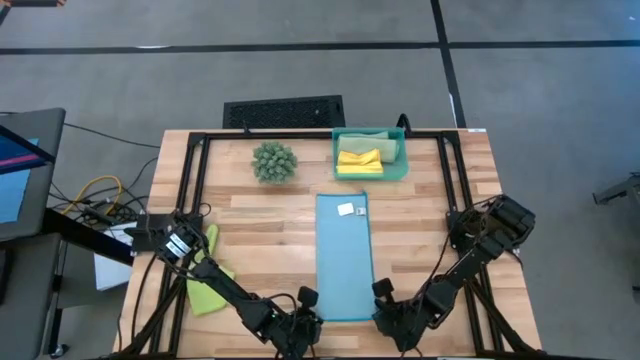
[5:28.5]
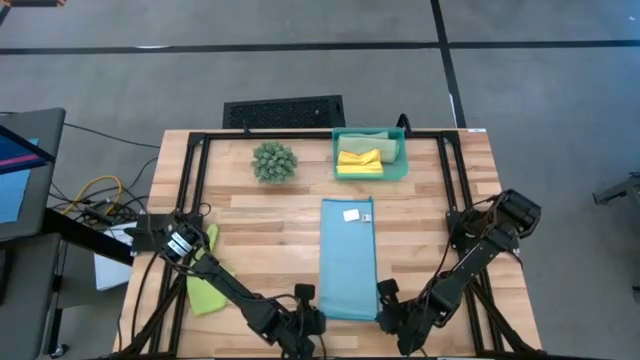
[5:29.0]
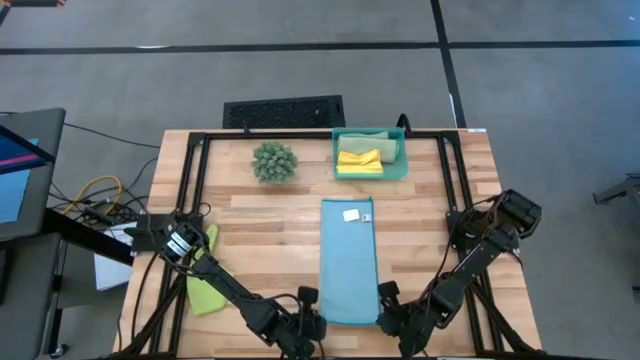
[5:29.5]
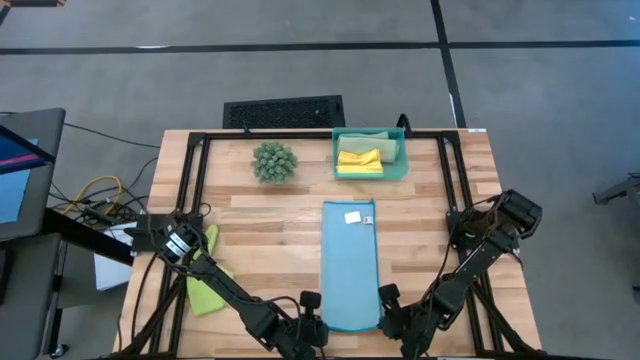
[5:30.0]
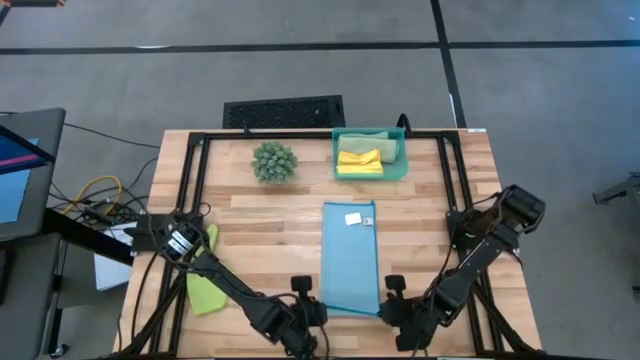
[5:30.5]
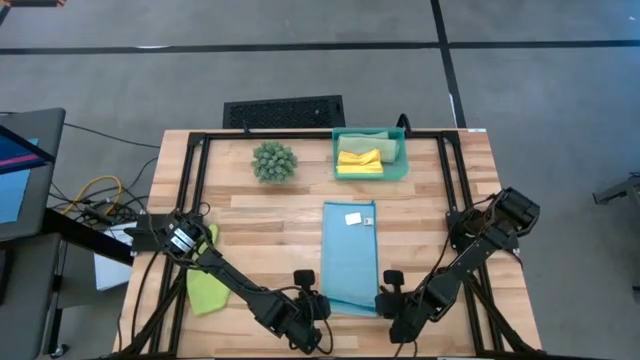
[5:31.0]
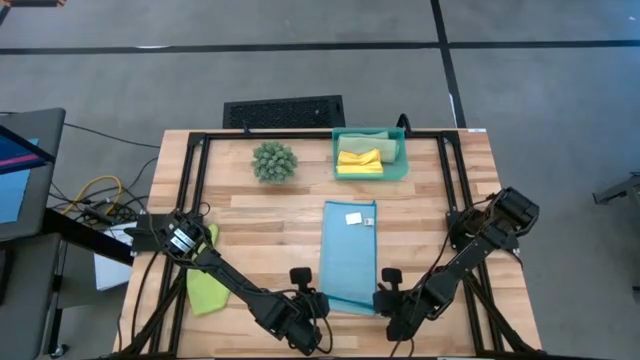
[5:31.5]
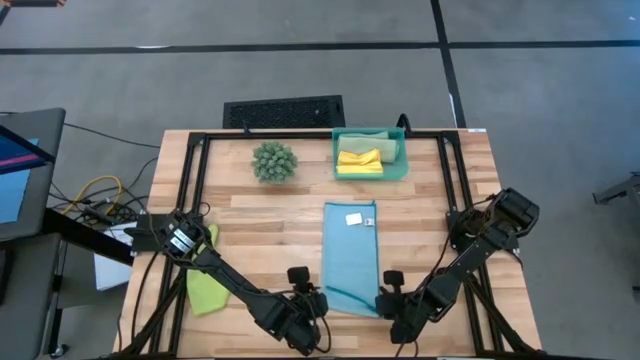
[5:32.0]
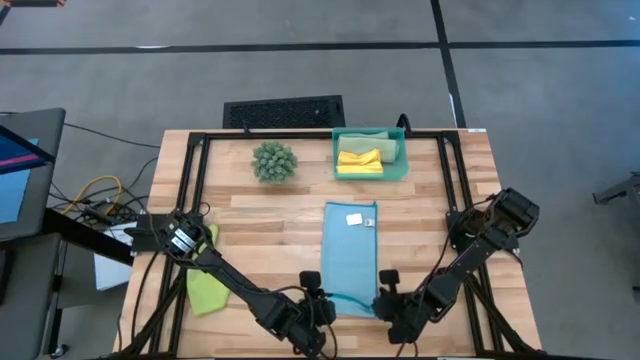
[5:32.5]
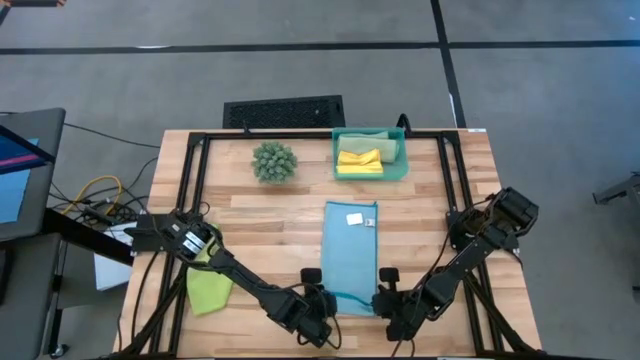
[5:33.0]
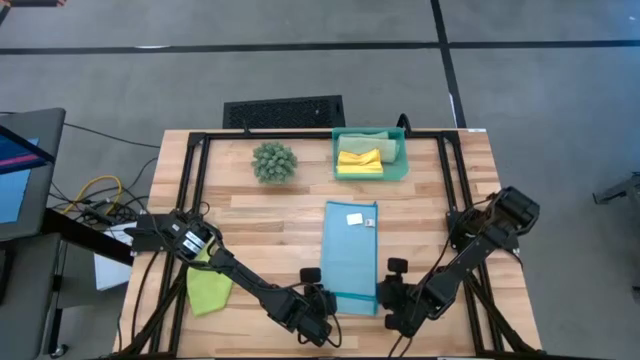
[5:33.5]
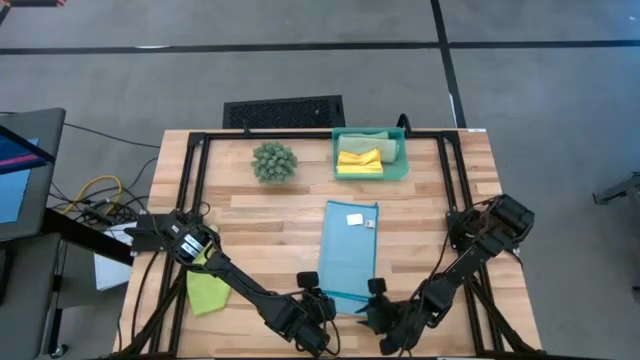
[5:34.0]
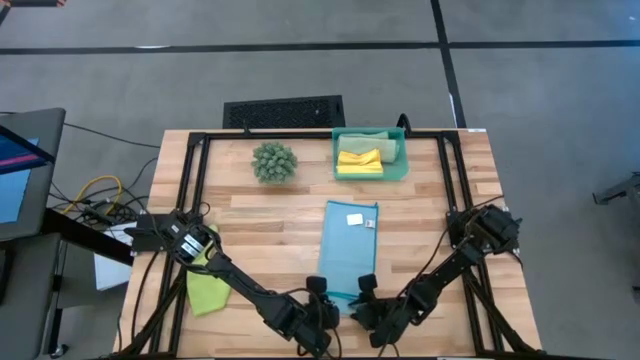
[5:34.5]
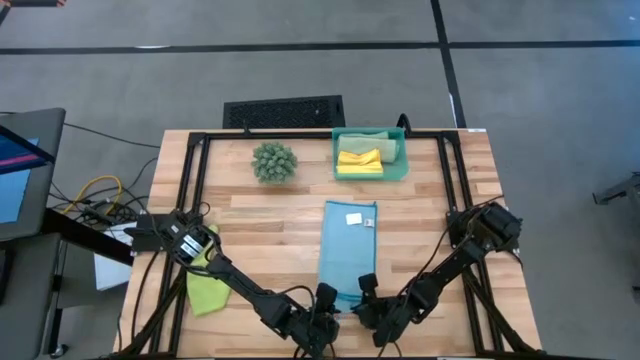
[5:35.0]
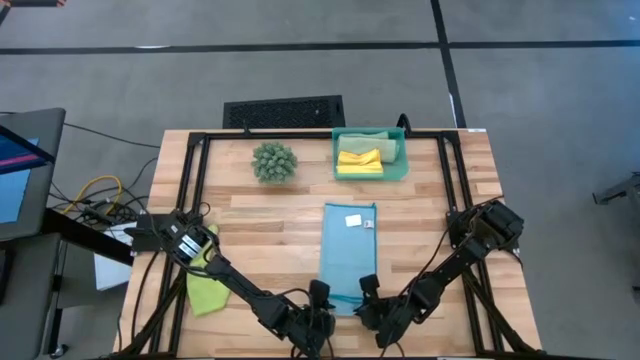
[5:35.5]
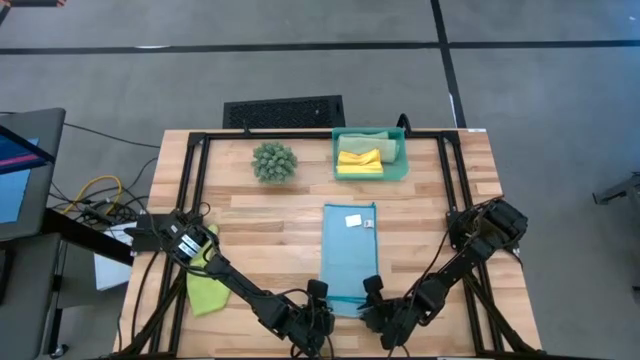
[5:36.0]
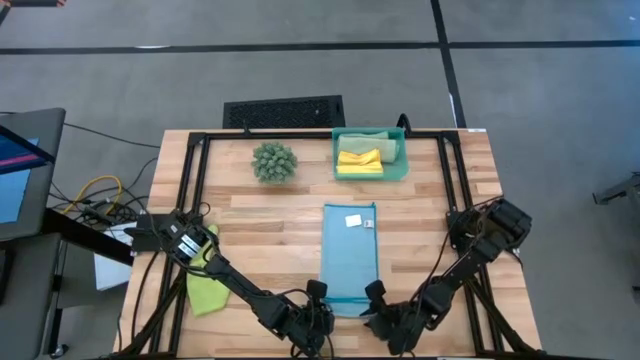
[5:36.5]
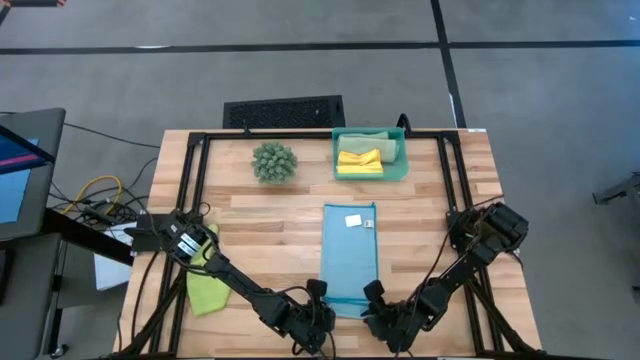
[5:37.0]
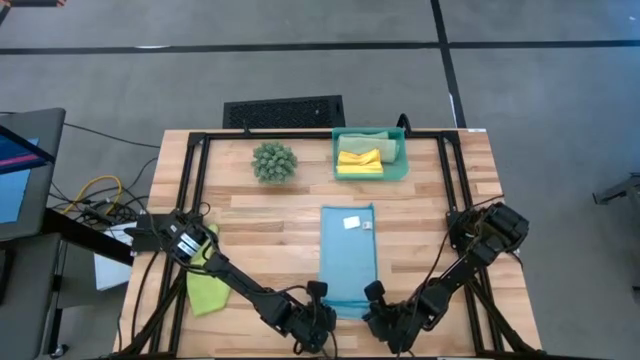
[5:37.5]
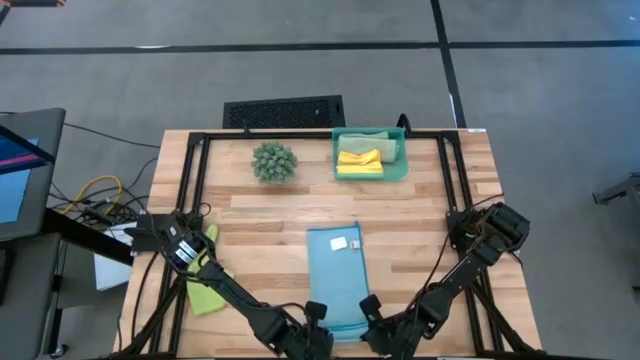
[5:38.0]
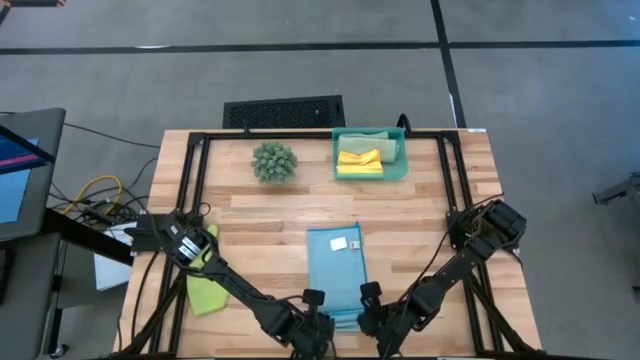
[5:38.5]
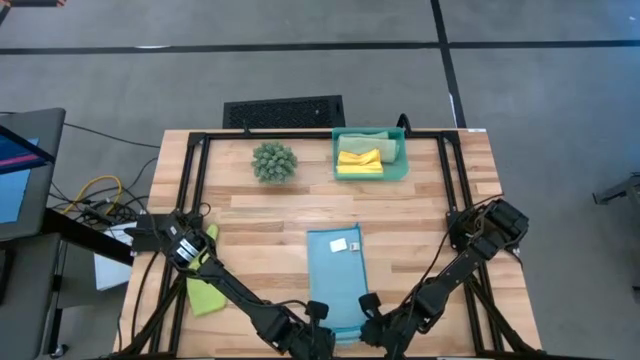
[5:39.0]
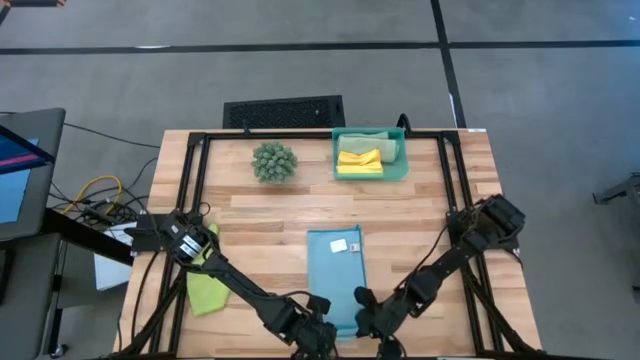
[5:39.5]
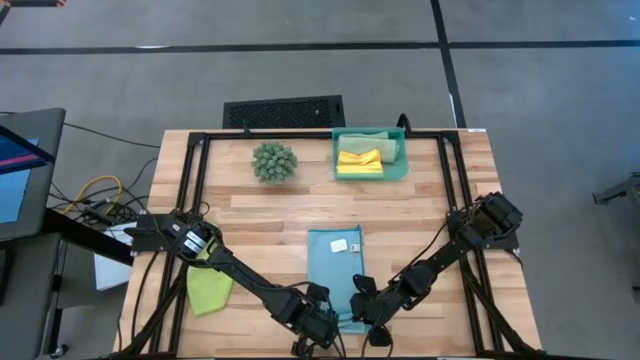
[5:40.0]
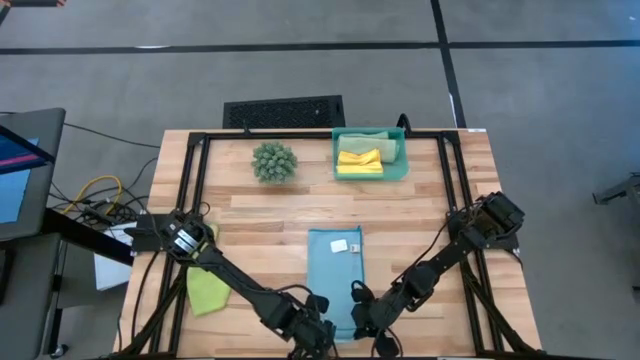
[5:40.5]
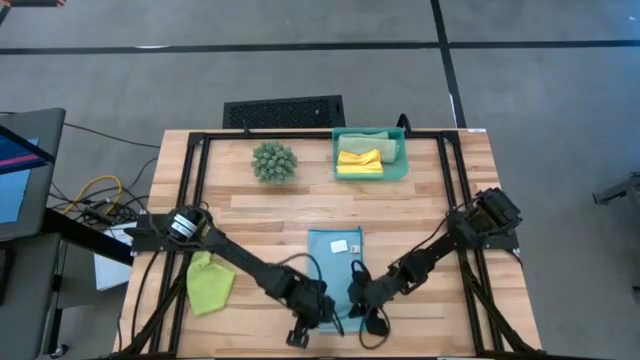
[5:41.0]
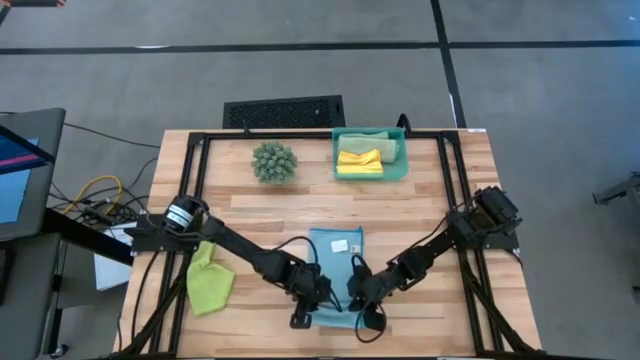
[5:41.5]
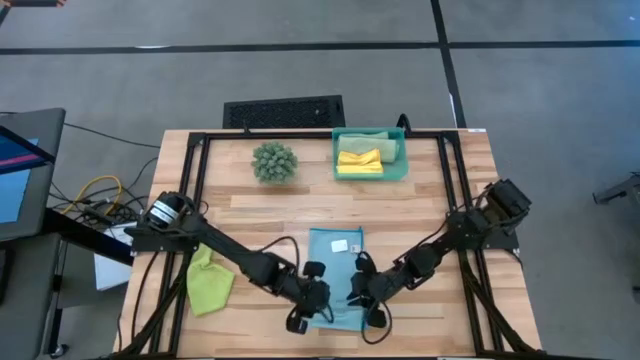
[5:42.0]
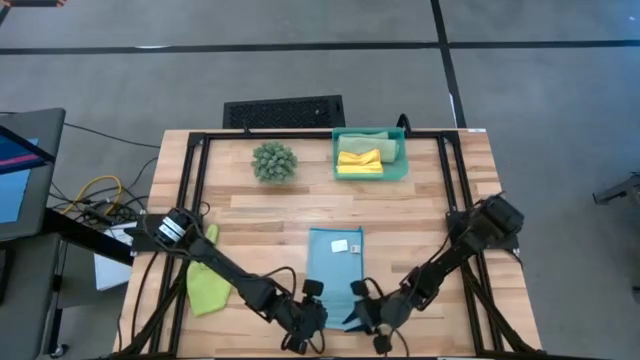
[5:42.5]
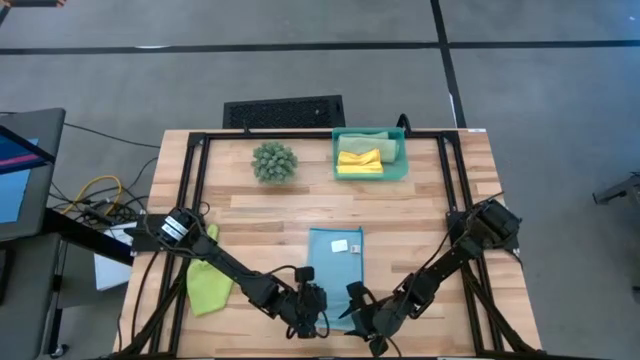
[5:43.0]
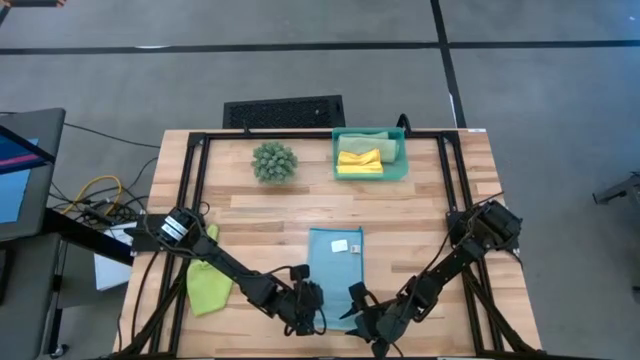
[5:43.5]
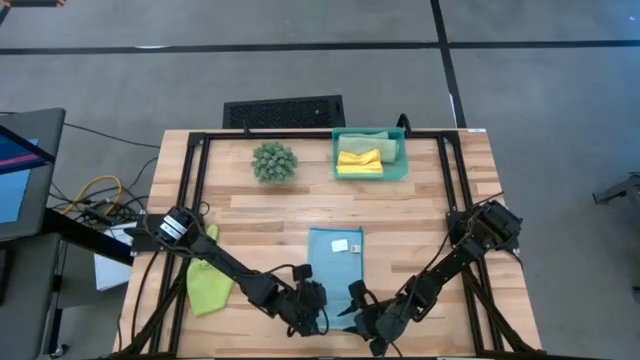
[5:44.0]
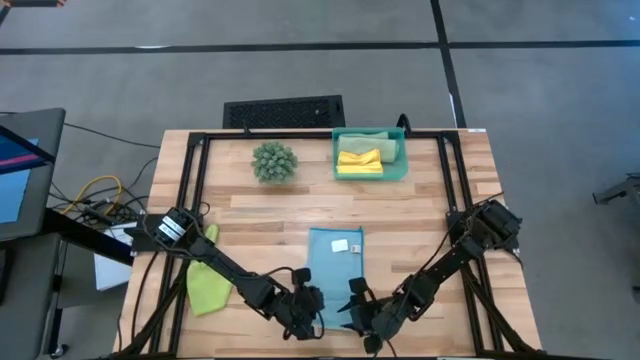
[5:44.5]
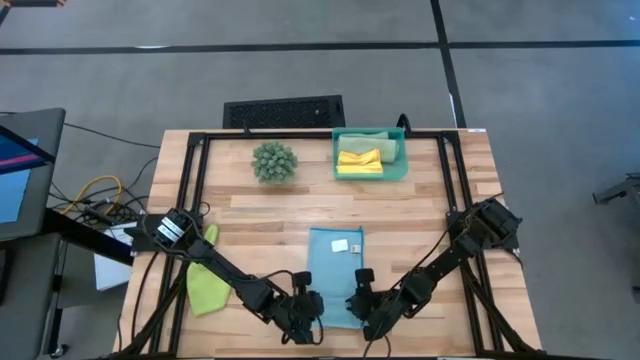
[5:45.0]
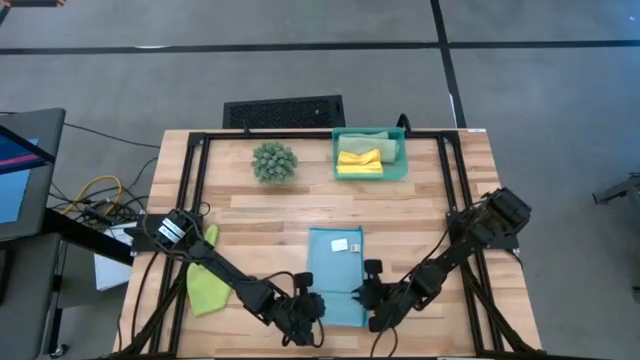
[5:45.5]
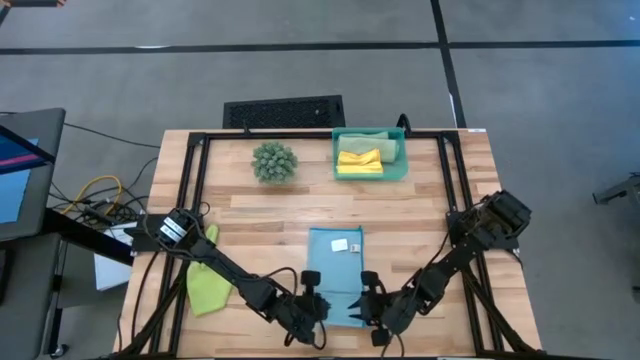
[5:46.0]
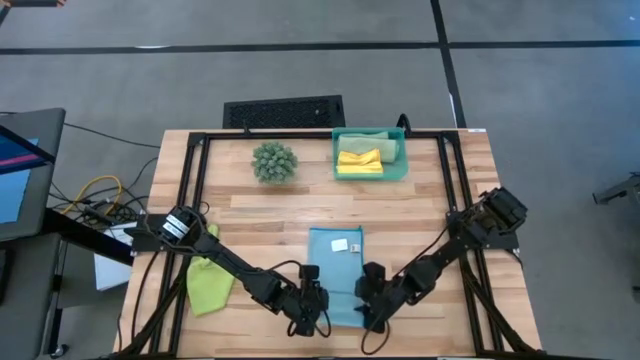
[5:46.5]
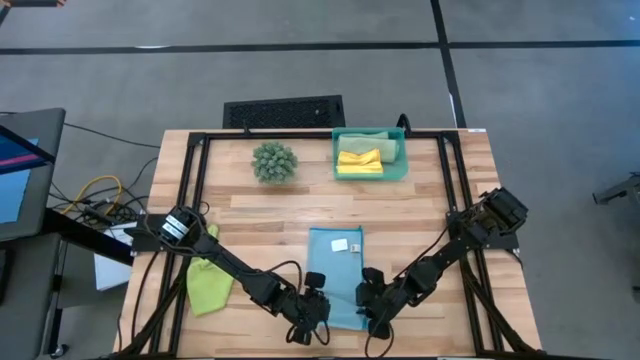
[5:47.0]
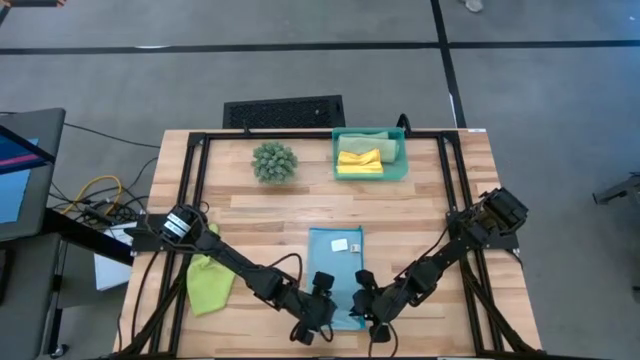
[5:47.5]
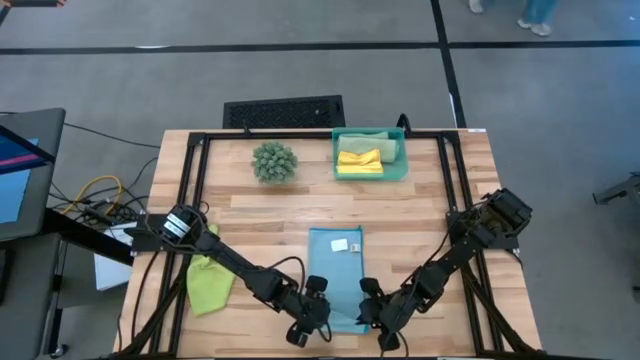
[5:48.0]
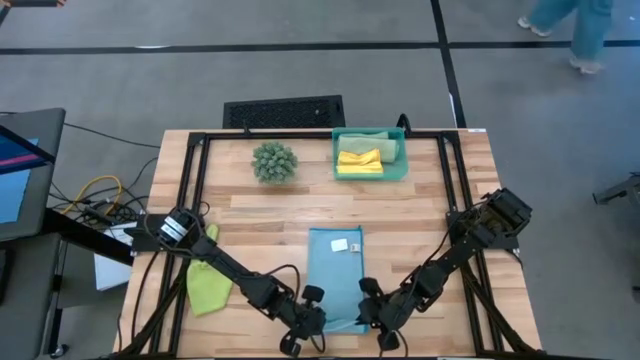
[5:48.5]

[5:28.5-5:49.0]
Task: Roll microfiber towels into tight, uniform cylinder then place into a basket
Roll the blue microfiber cloth
